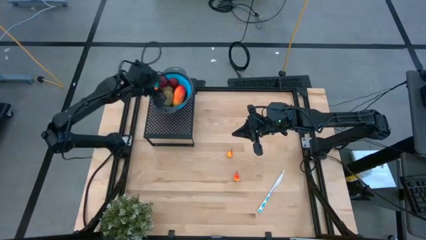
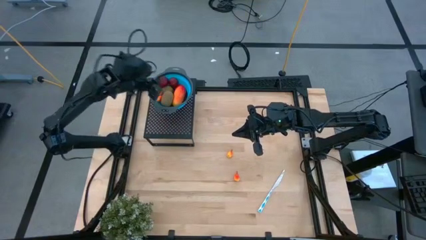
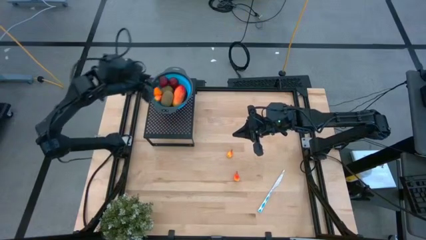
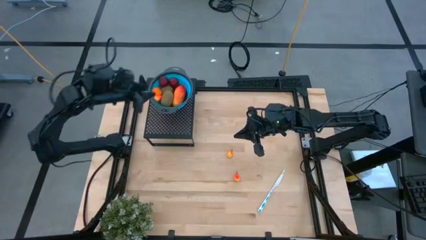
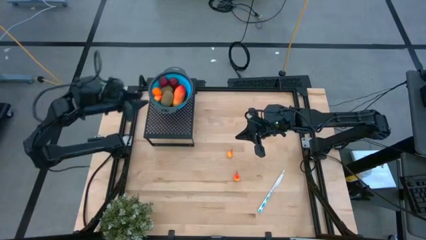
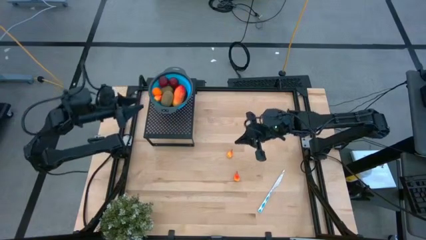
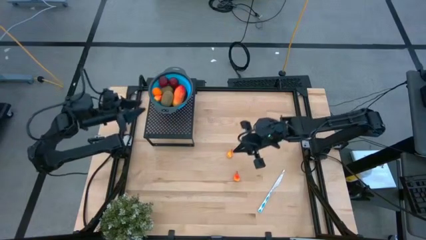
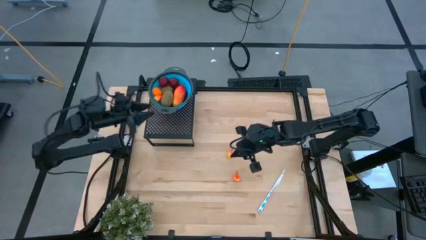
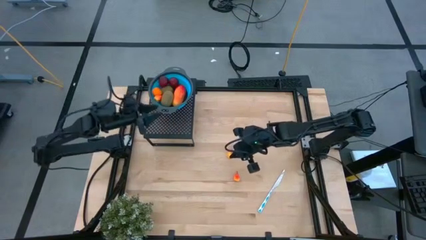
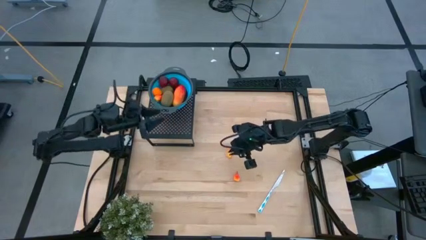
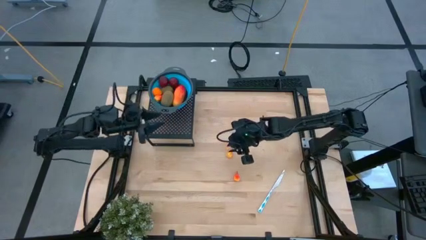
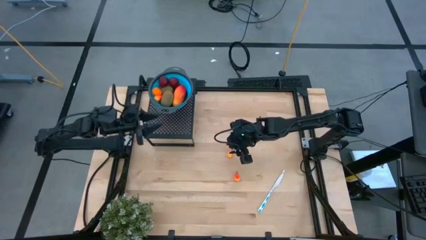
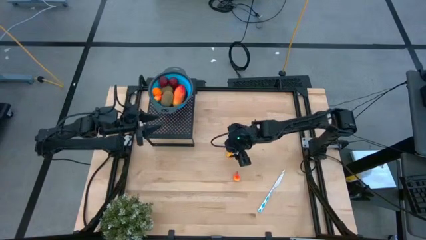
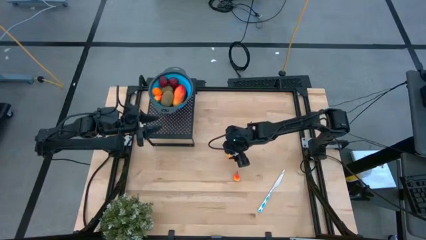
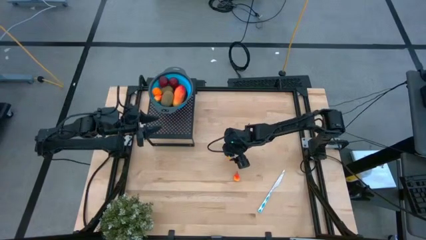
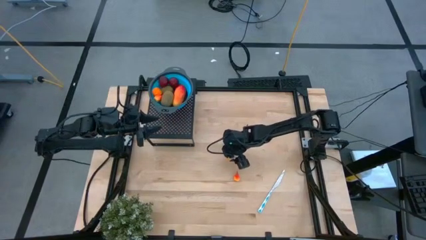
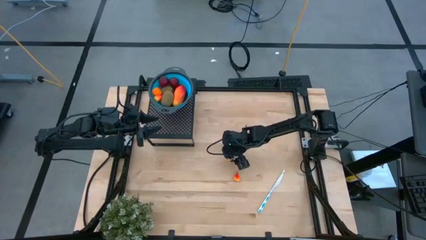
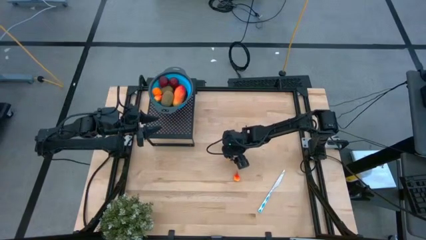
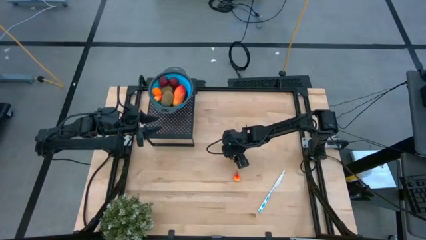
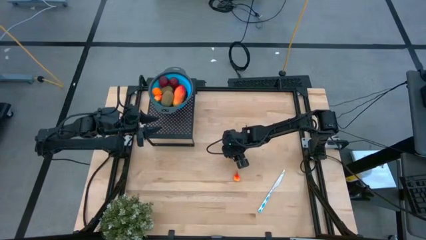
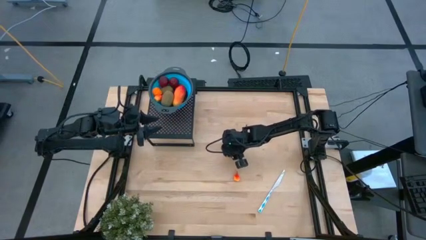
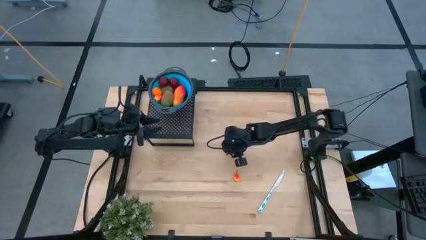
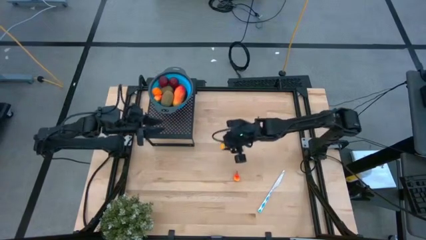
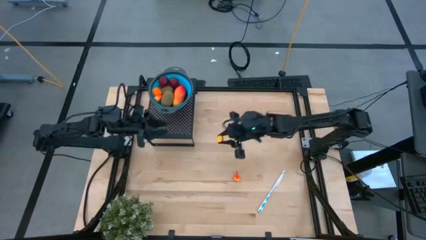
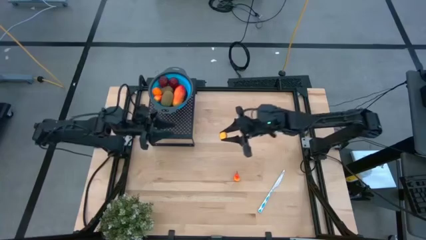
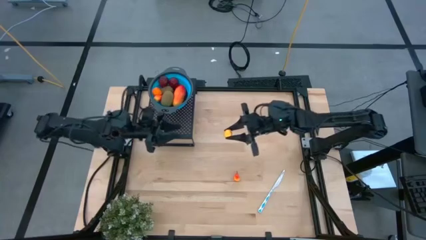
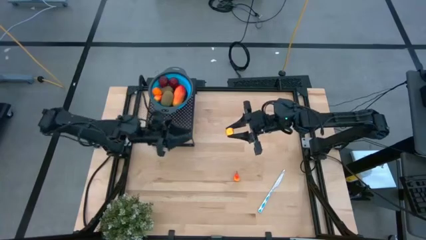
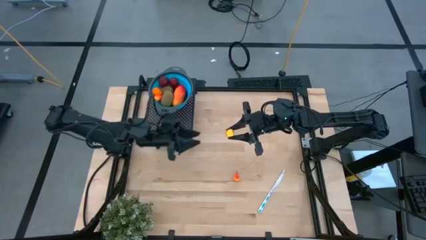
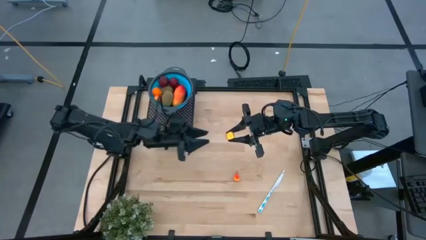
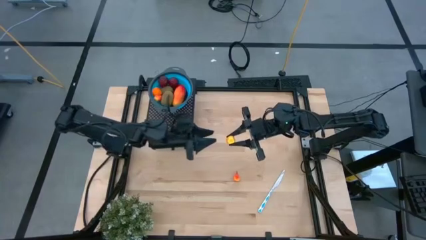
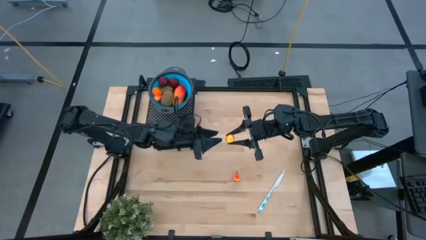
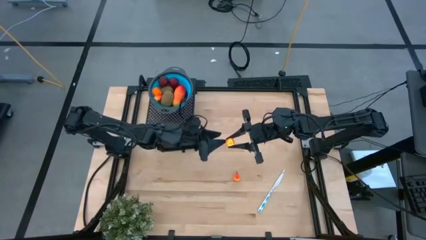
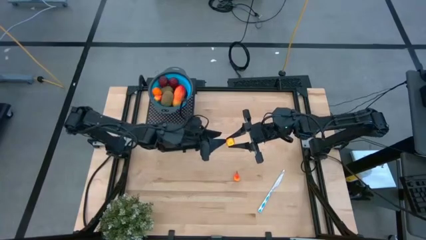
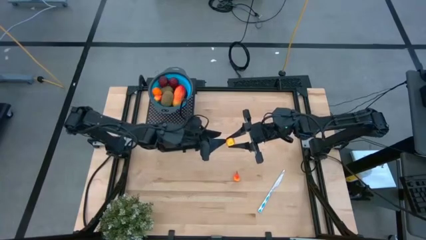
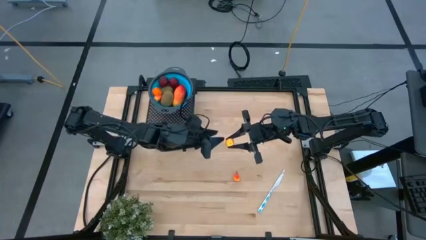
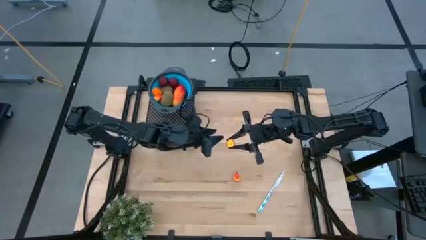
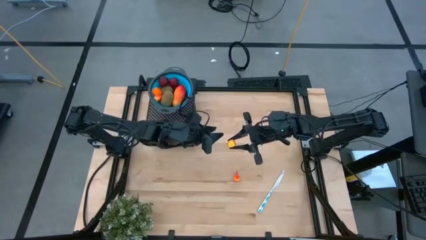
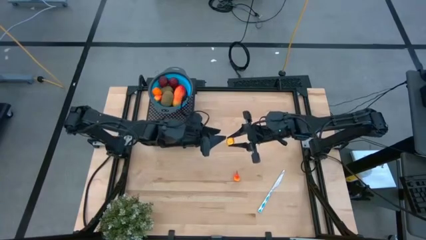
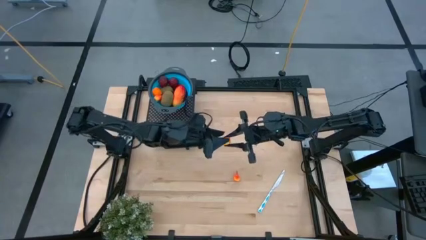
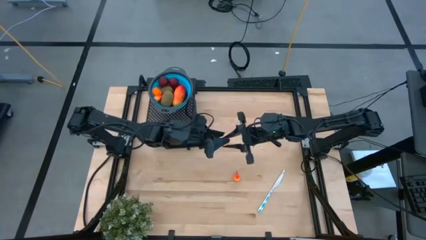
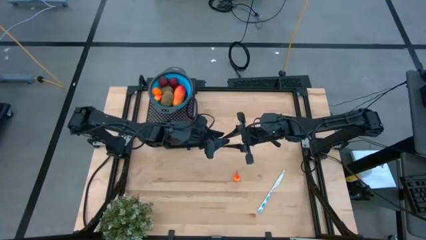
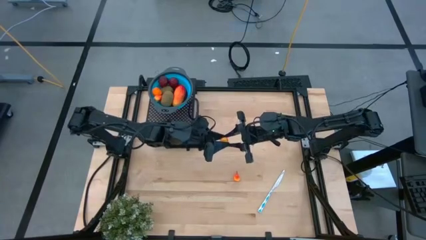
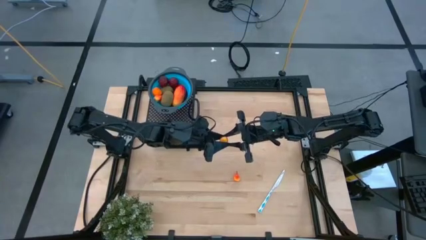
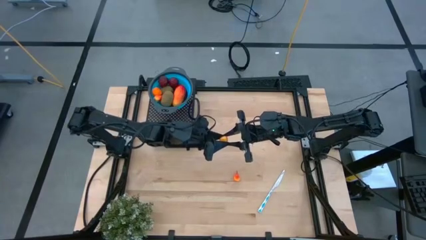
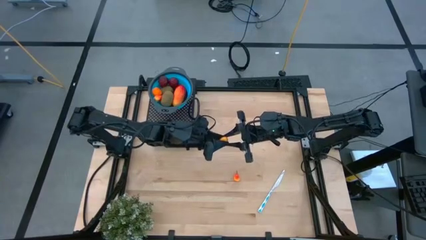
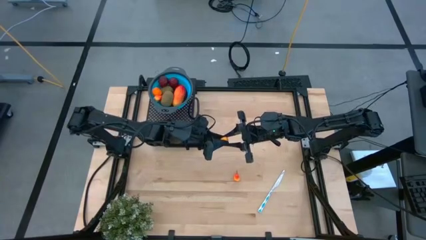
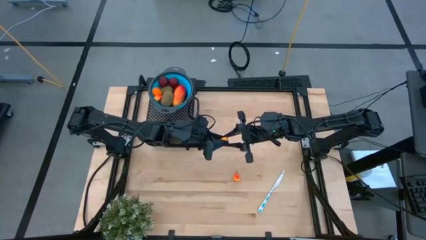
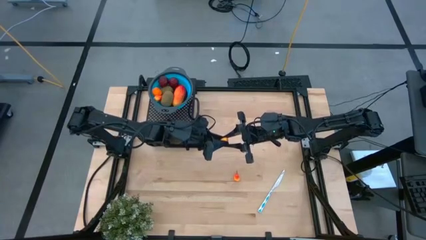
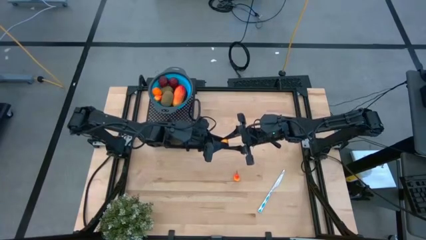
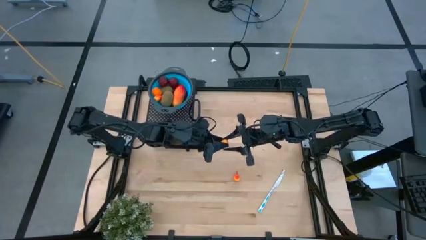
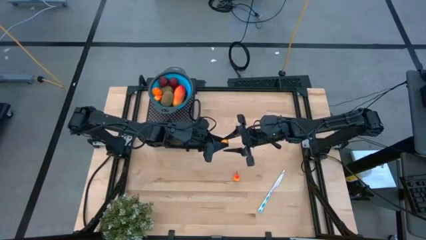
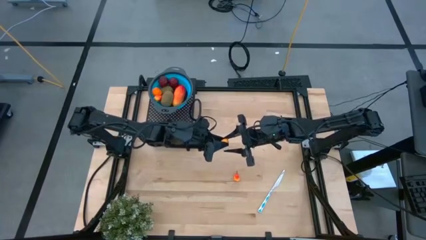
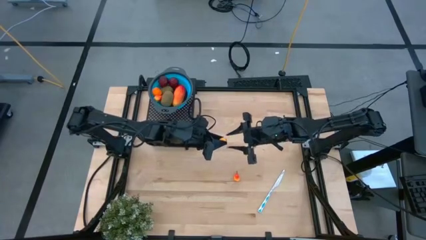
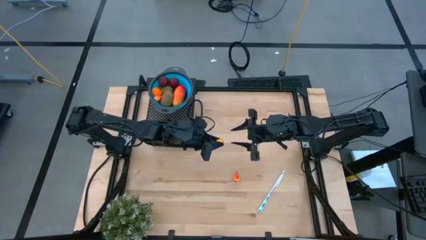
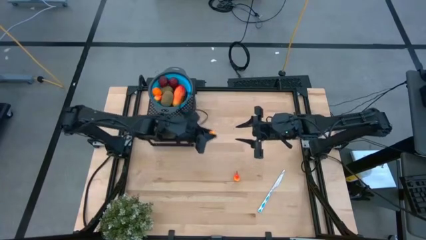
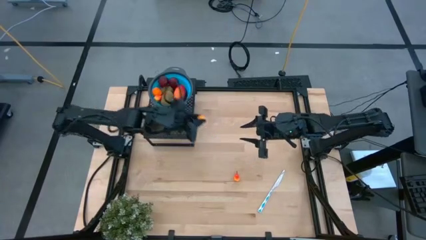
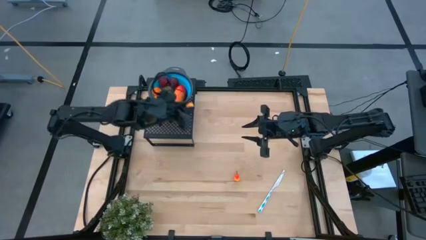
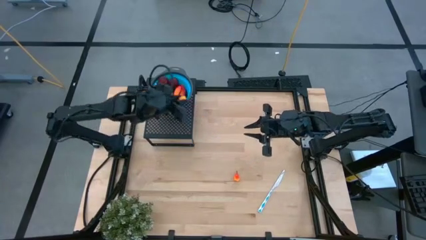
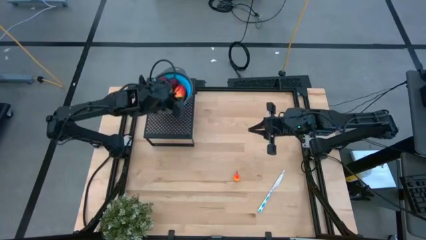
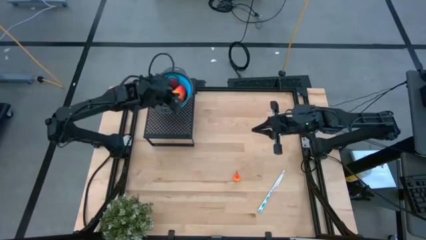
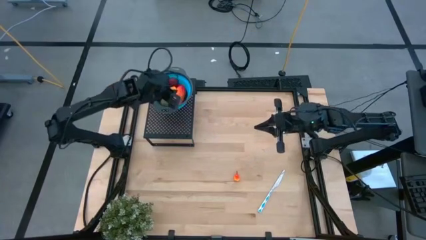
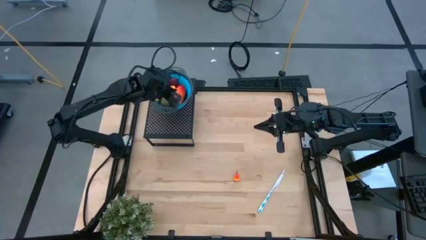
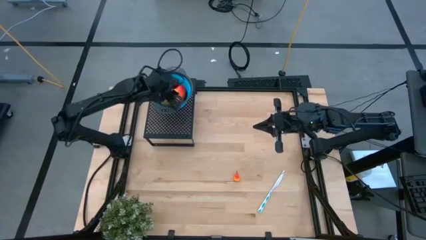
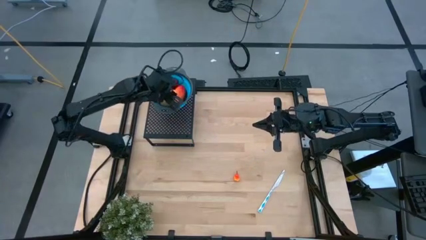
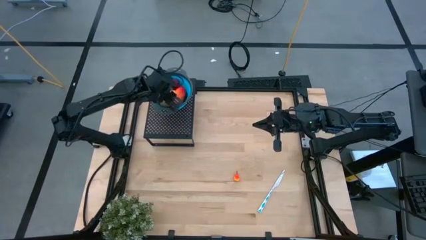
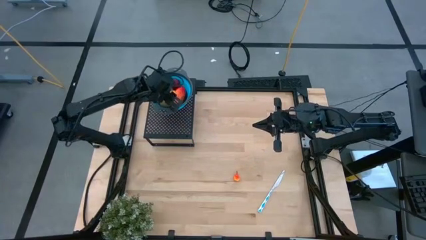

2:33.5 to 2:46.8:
Task: Pick & Place Fruit
Put the top peach into the blue strainer bowl on the shelf

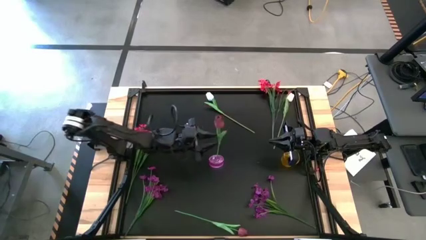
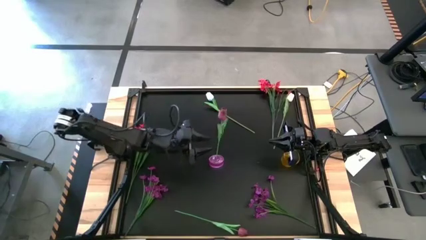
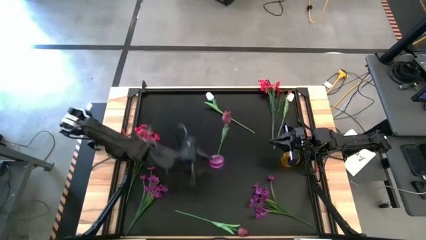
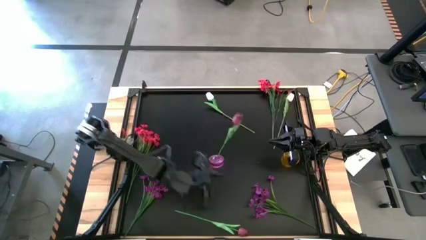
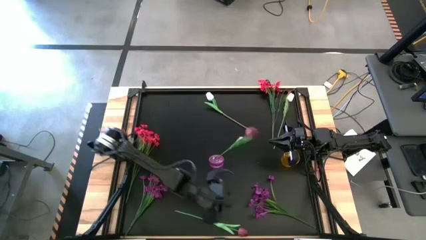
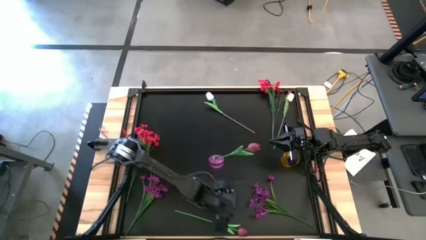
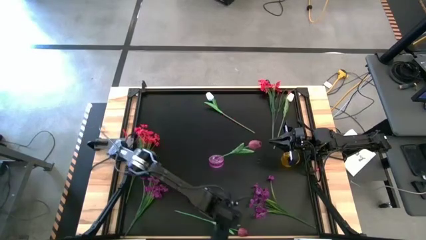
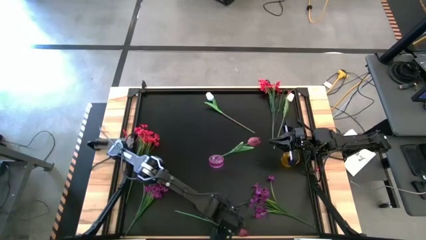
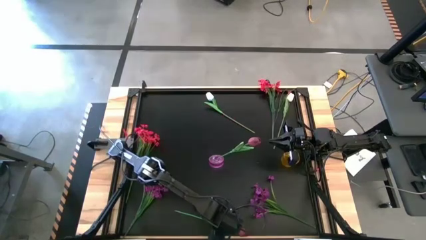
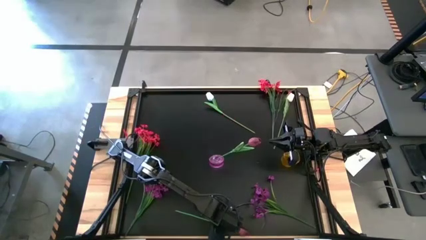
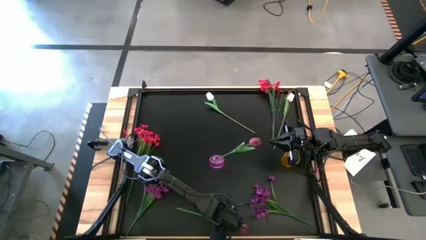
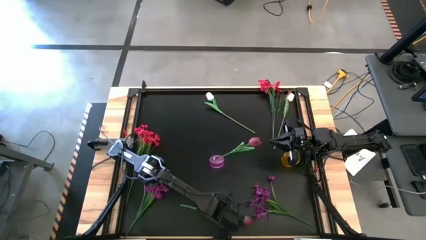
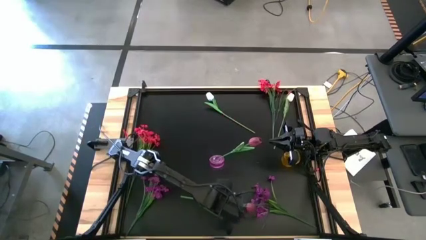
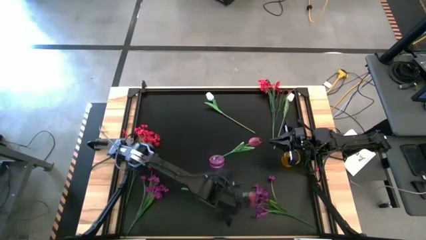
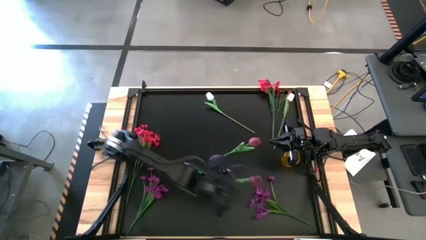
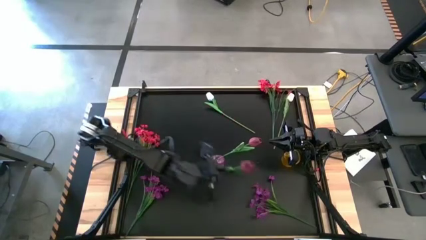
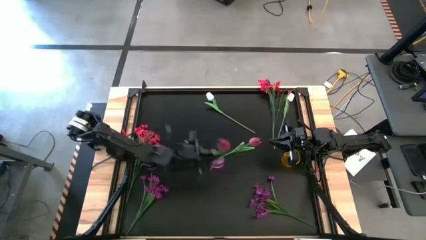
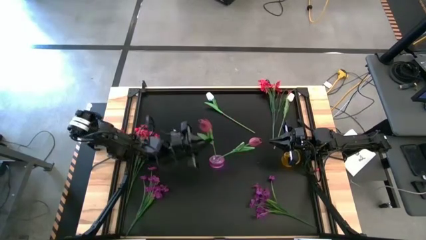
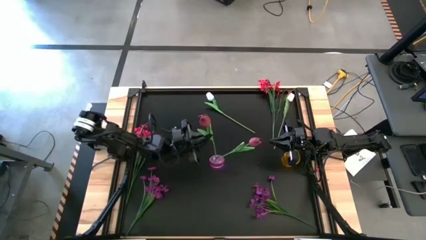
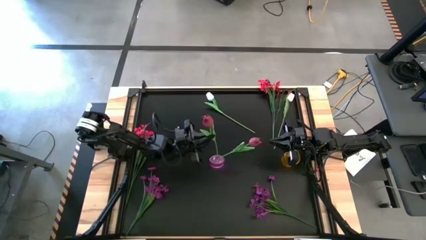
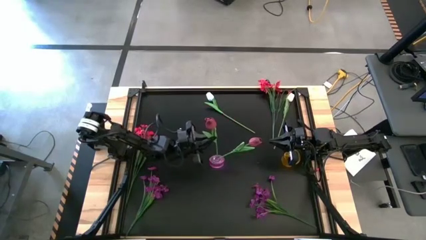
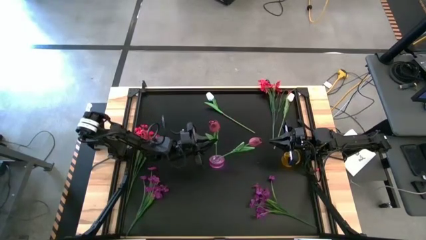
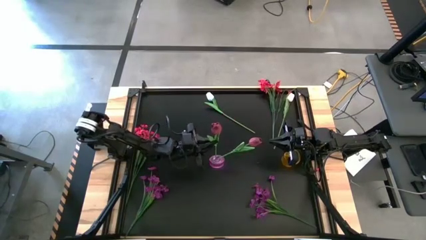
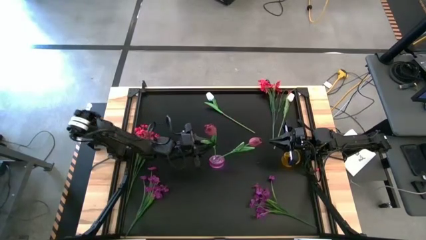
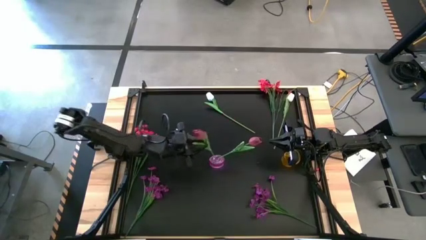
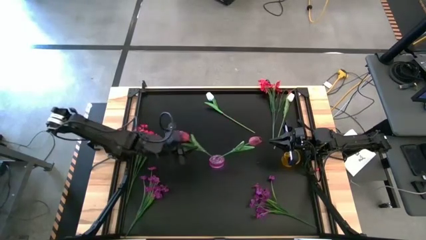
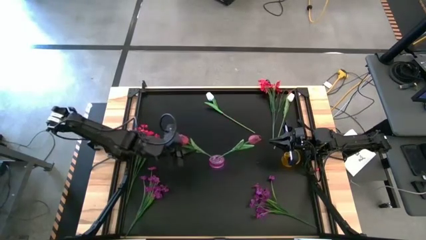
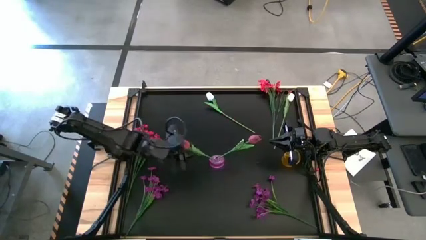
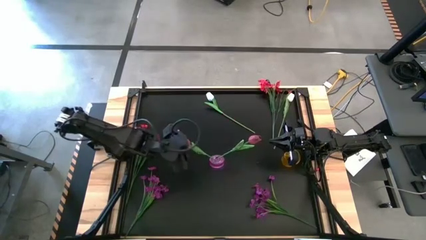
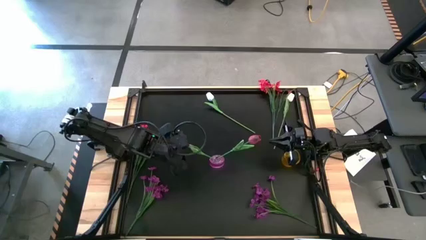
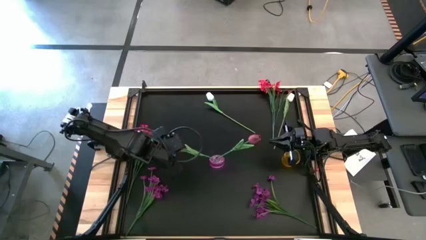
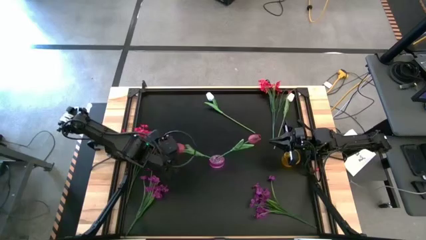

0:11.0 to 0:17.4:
Task: Sort flowers into vase by color
Put the dark red flower into the pink violet vase
